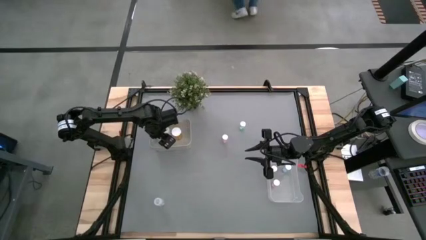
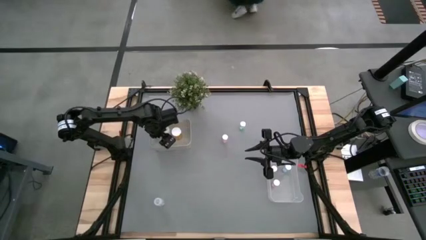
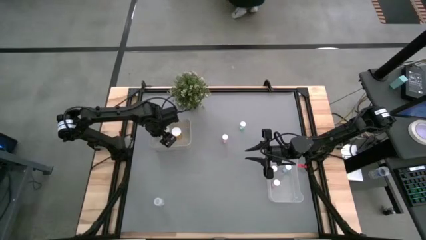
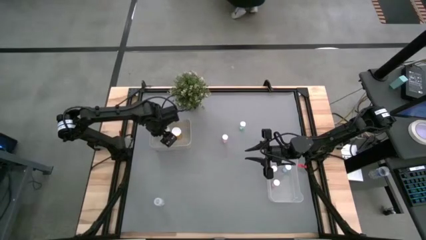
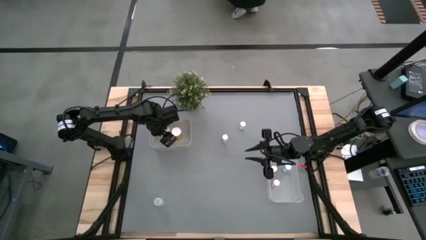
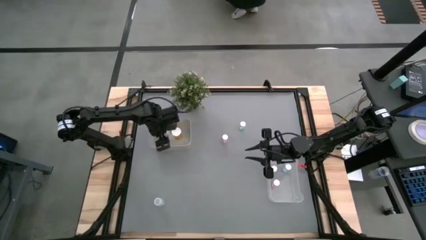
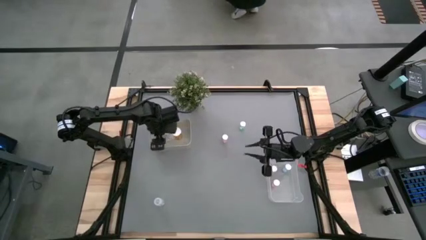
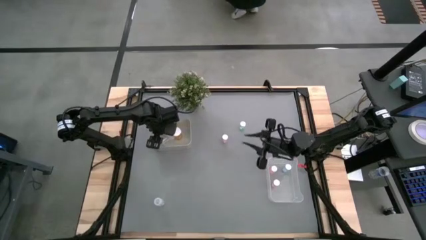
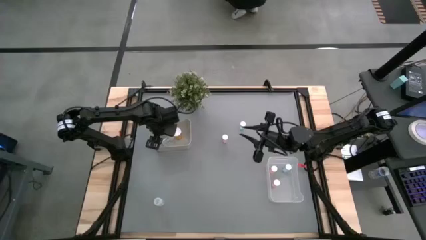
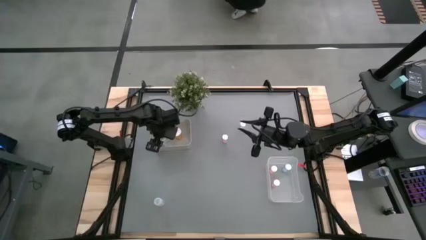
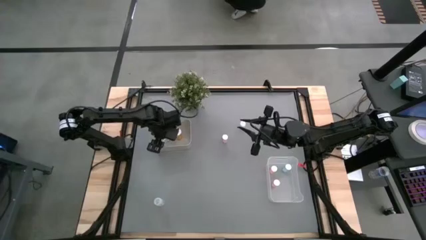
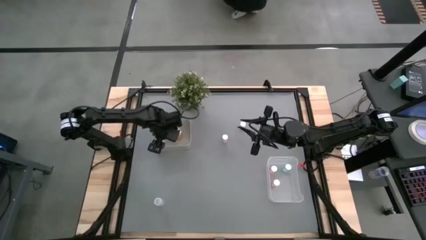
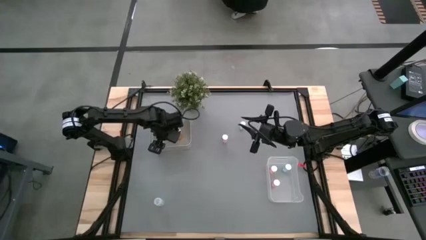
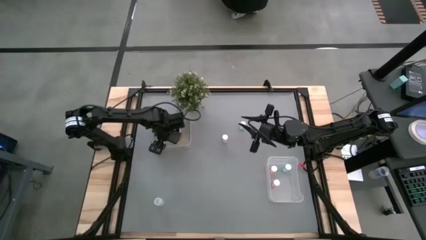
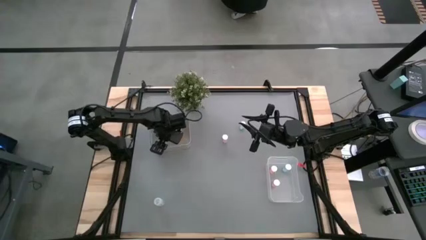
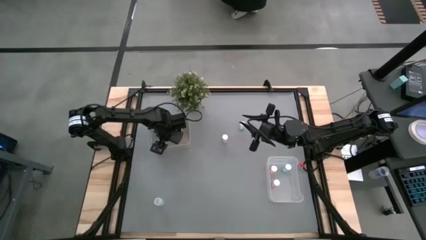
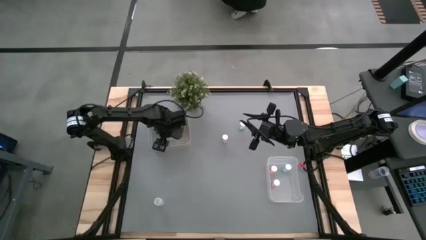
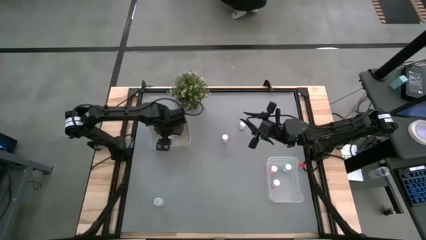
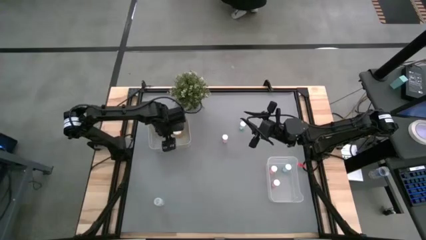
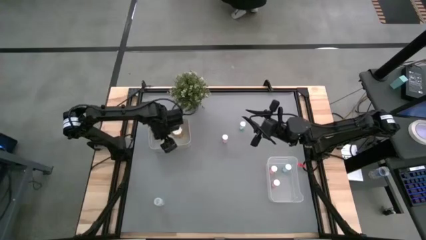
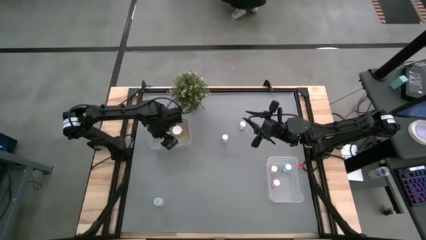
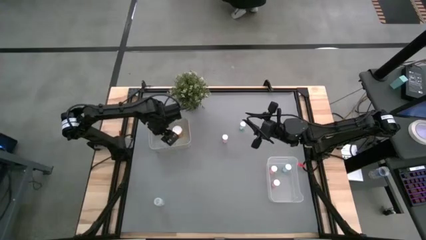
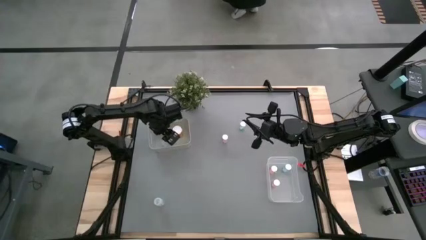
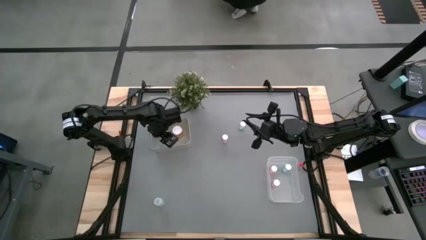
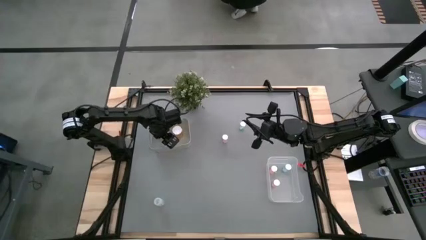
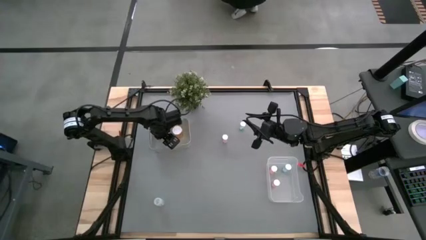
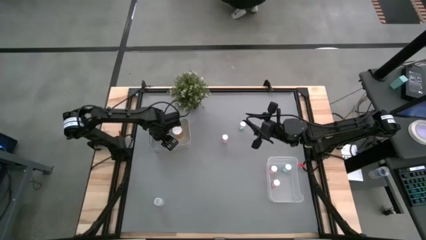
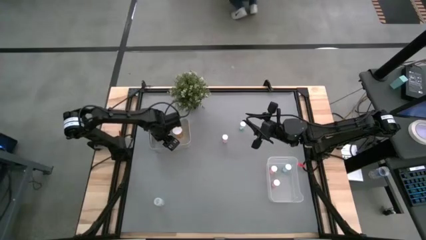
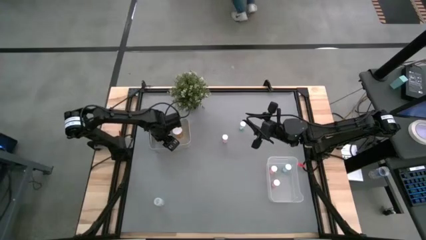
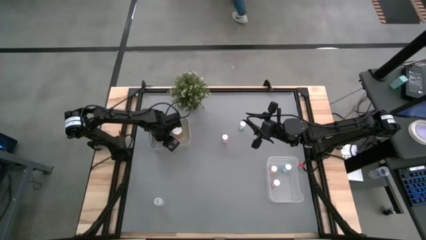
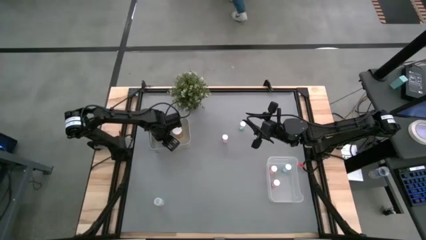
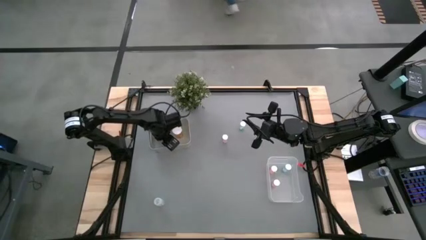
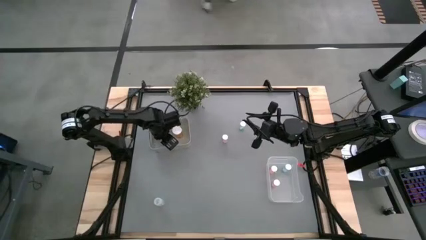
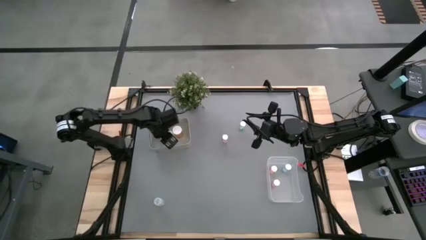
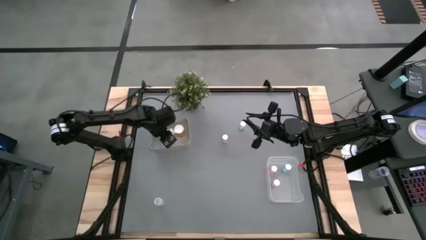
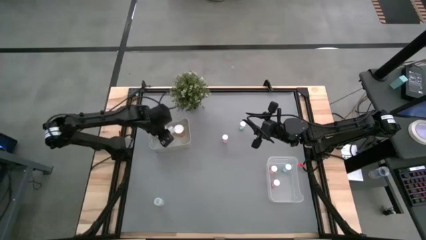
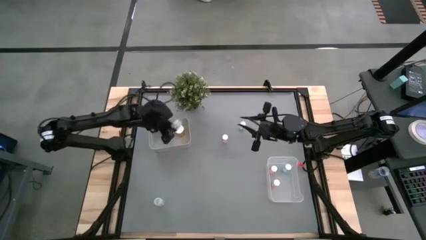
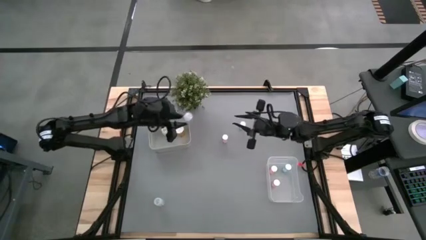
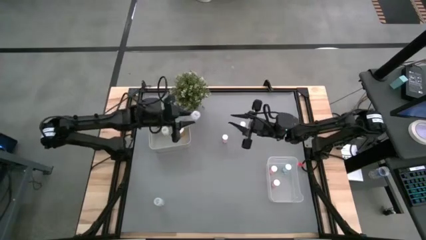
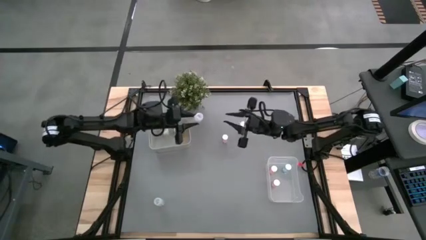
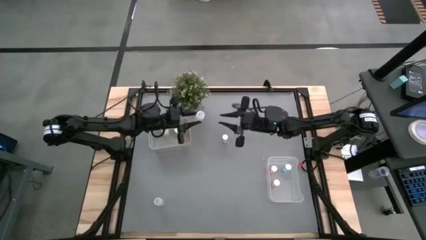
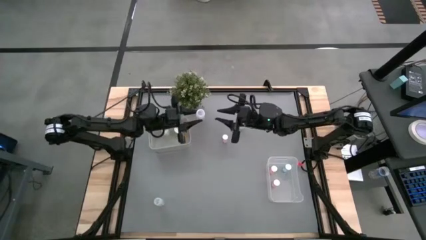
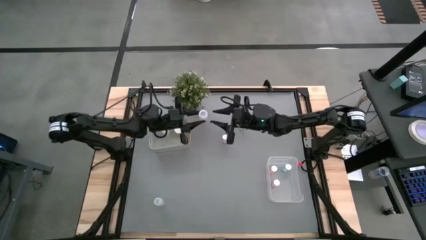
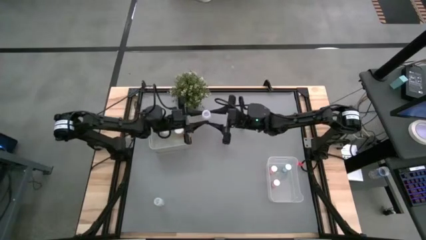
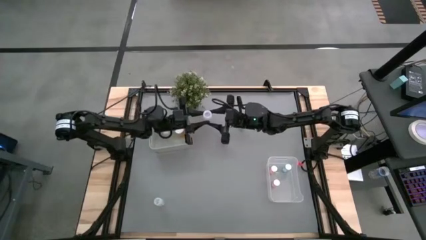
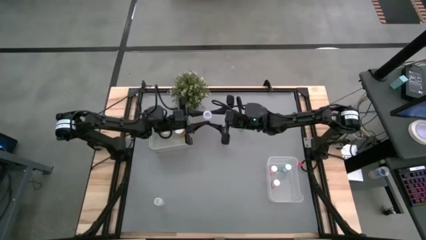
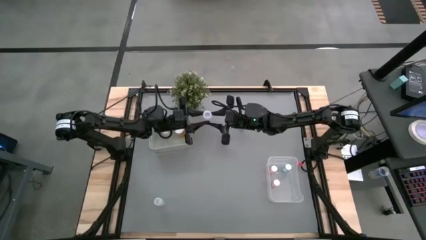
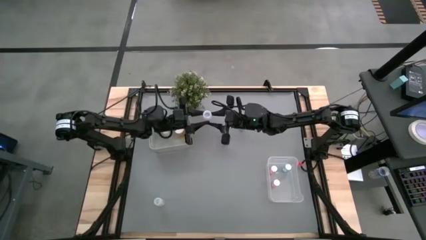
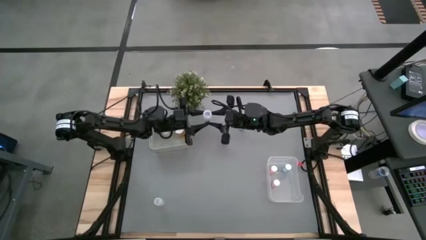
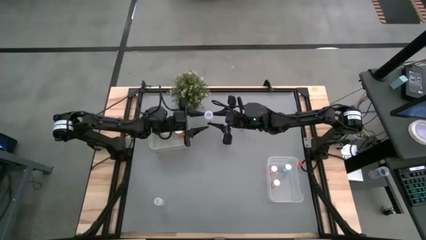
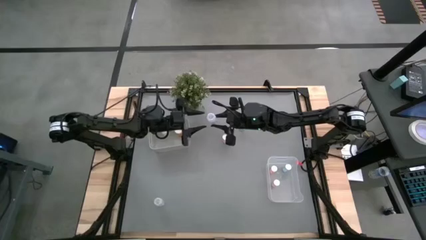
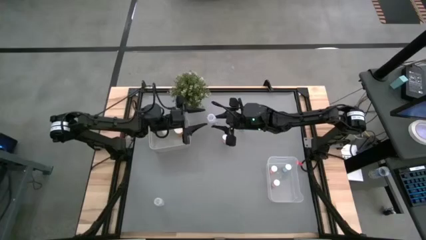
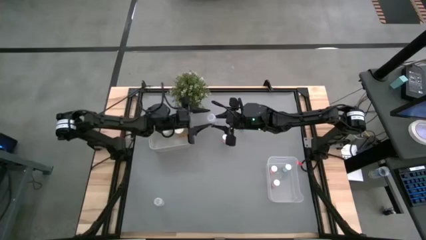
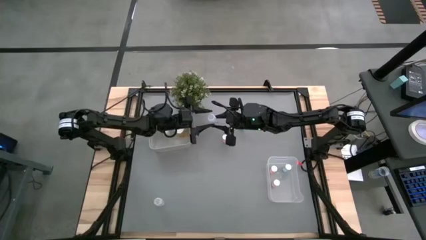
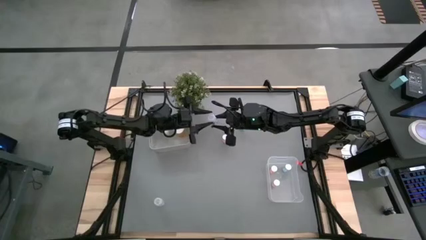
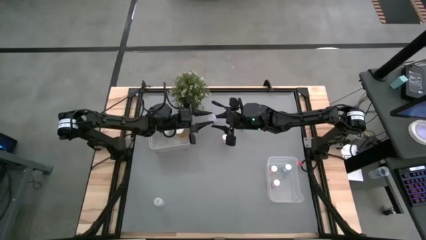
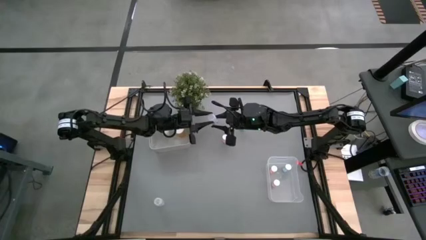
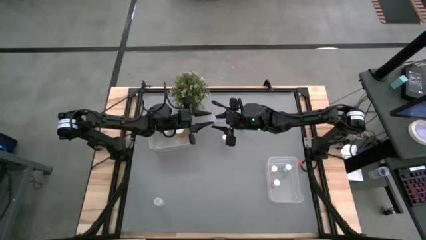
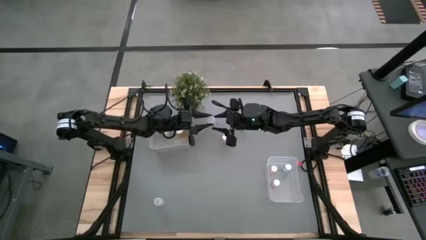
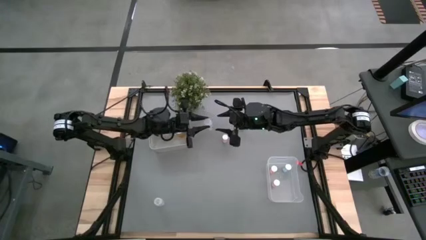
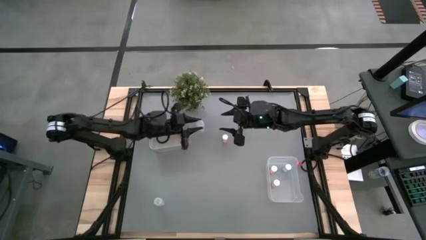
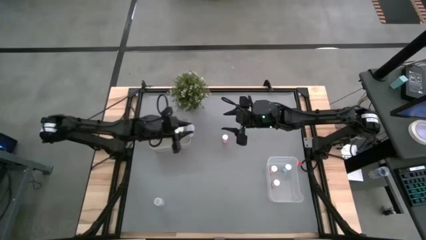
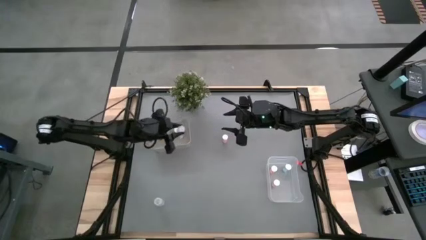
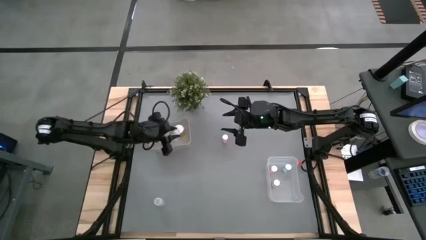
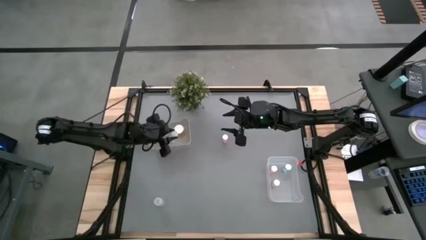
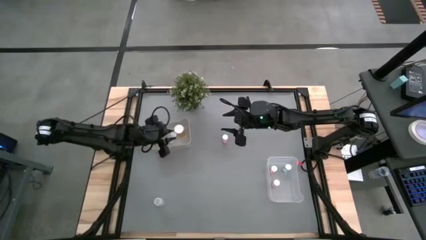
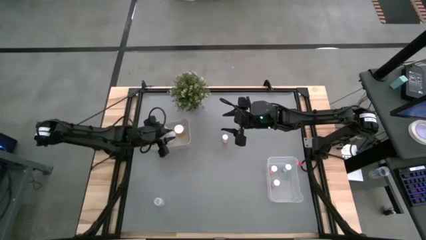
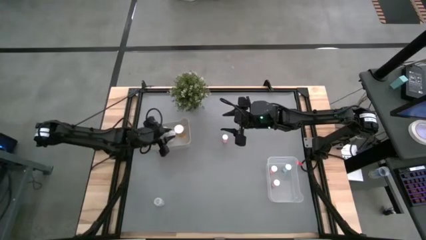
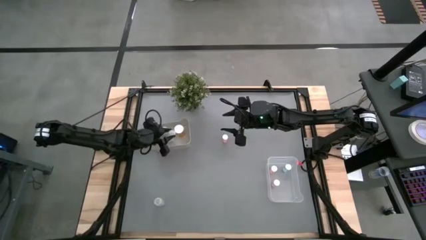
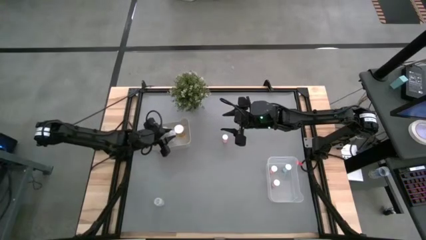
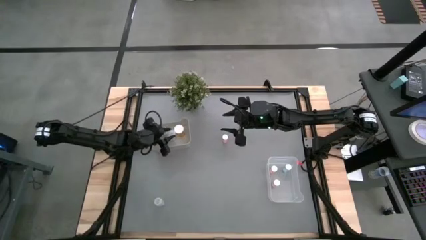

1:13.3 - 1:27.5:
Task: Pick and place medicine bottles into bin by pill shape (circle, oval)
Put the top transparent pill bottle into the gray bin

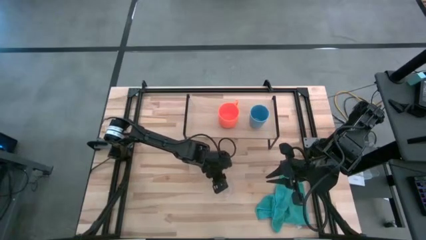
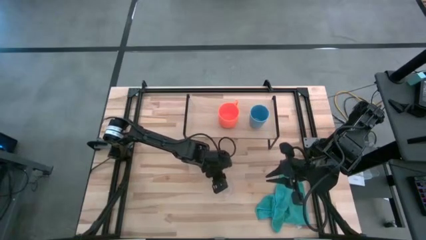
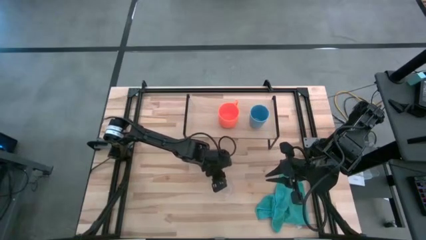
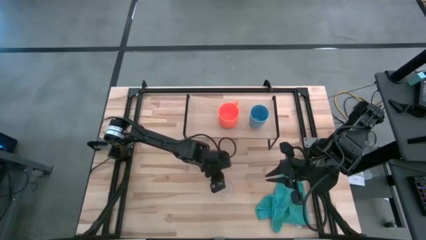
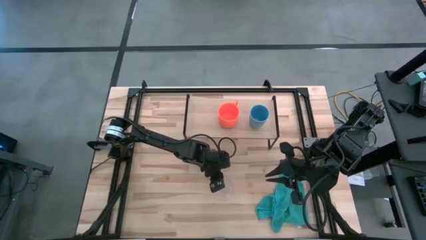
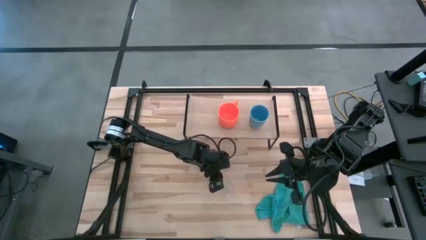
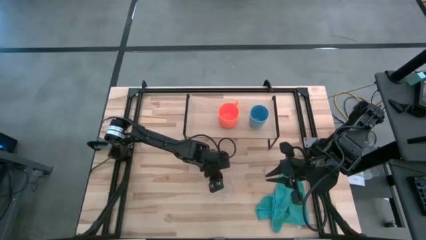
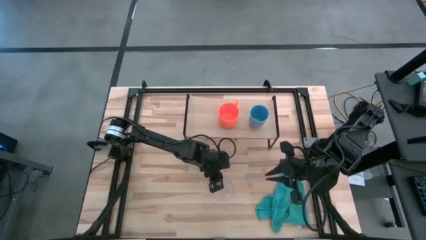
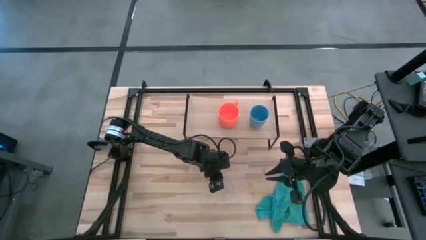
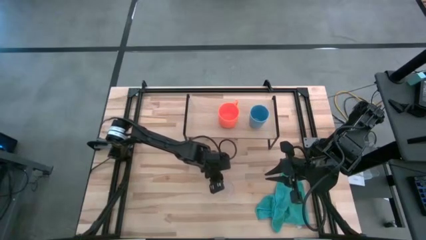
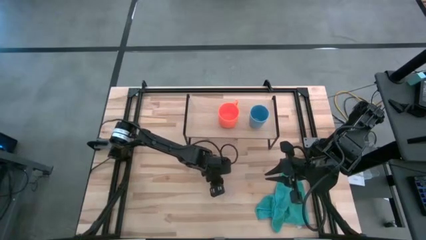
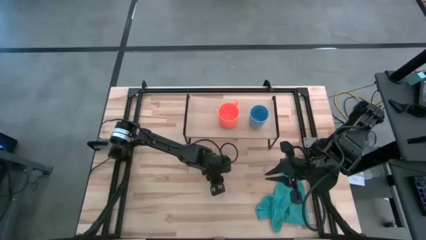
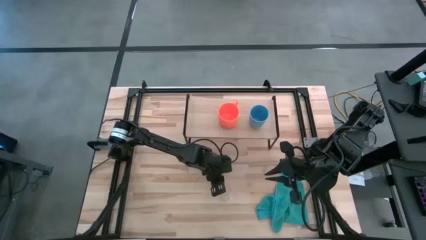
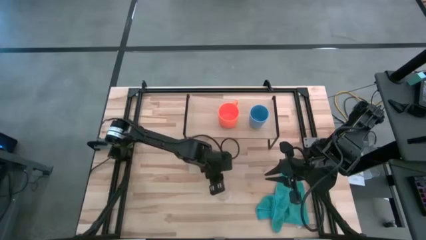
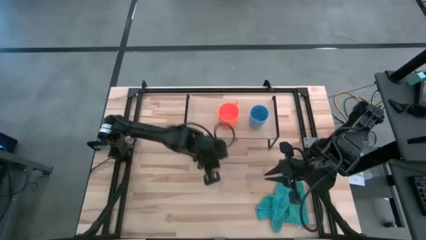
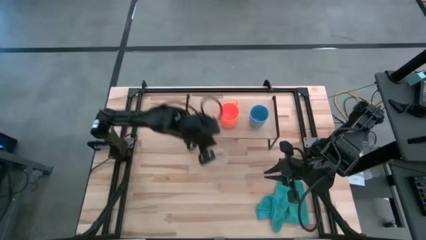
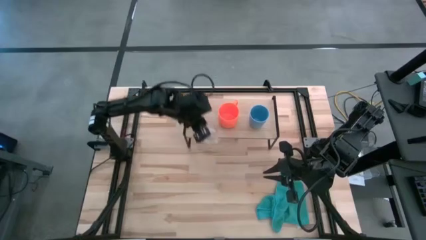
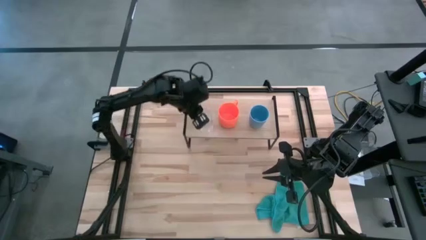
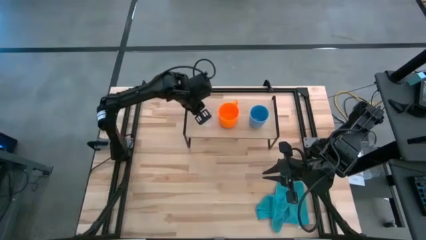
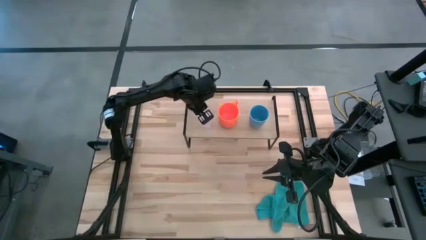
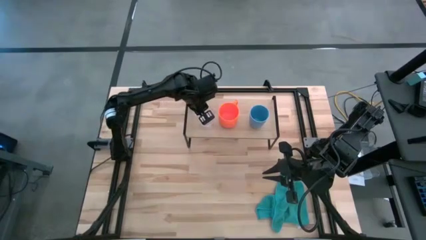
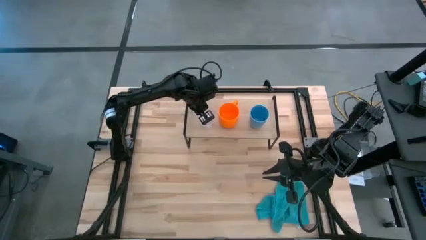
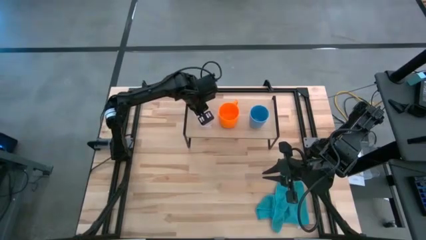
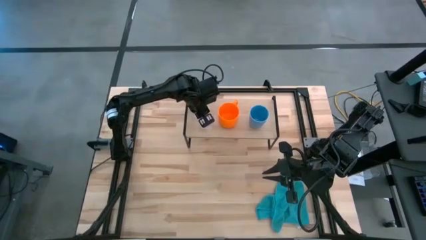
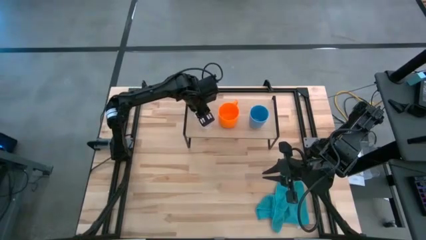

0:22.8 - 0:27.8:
Task: Stack small to large cups/mugs on shelf
Put the transparent mug on the shelf
